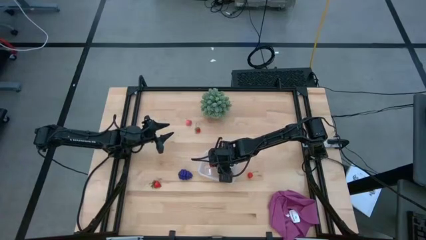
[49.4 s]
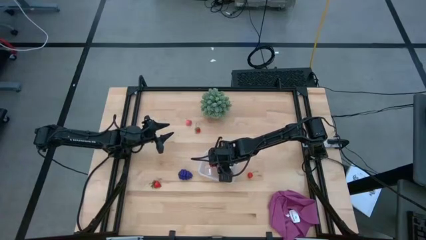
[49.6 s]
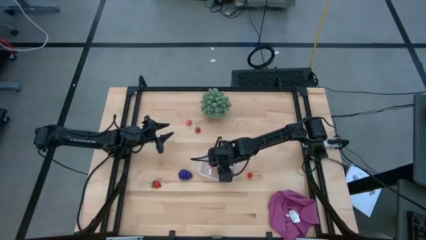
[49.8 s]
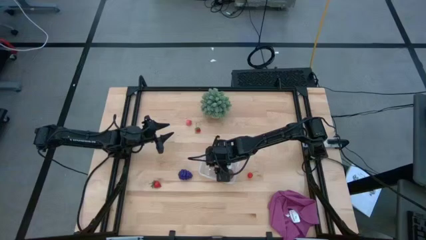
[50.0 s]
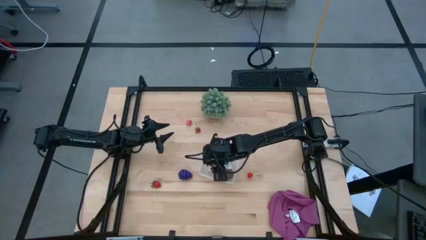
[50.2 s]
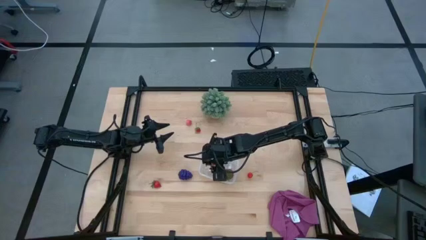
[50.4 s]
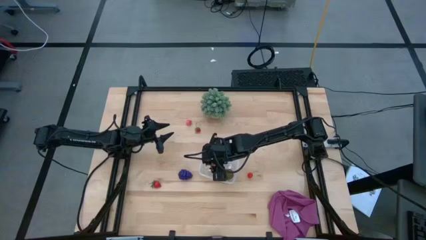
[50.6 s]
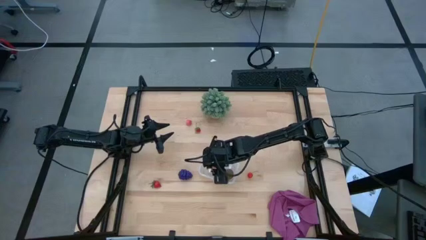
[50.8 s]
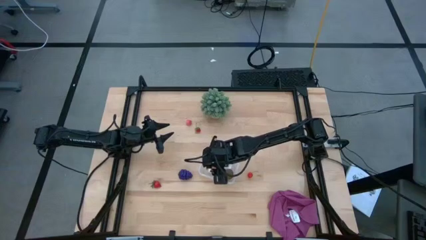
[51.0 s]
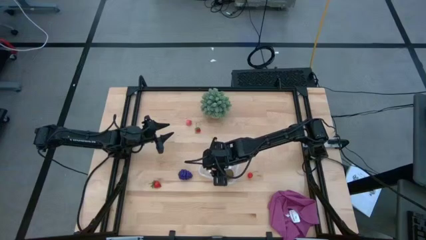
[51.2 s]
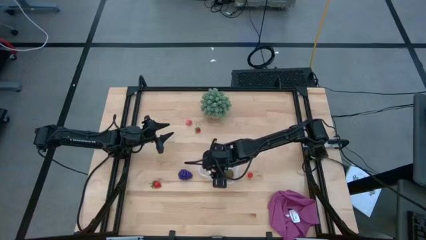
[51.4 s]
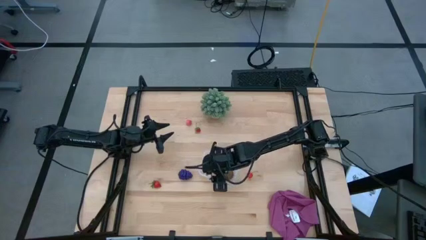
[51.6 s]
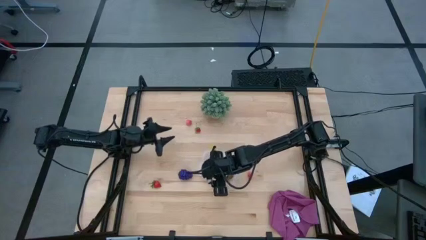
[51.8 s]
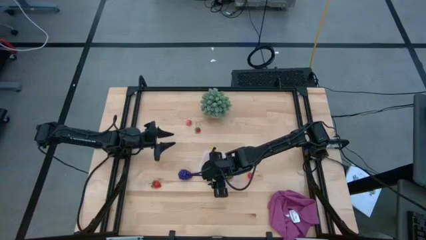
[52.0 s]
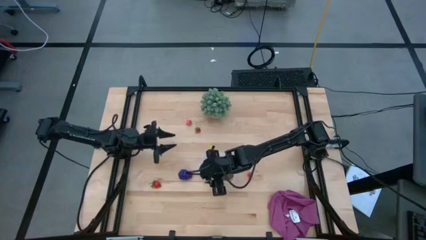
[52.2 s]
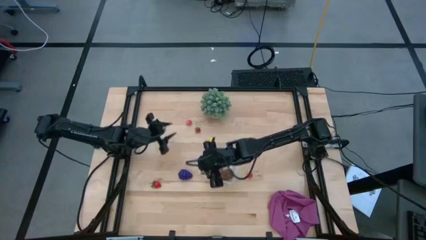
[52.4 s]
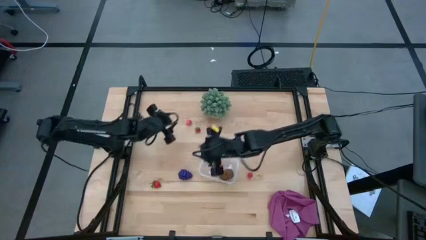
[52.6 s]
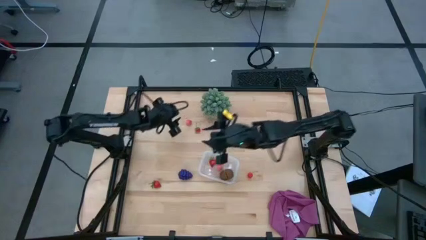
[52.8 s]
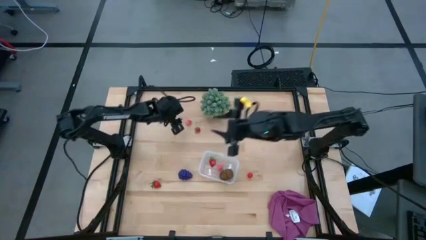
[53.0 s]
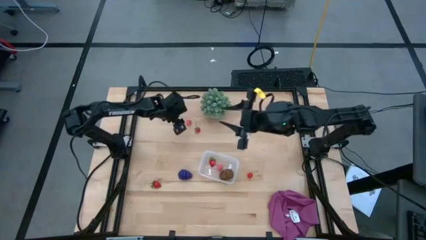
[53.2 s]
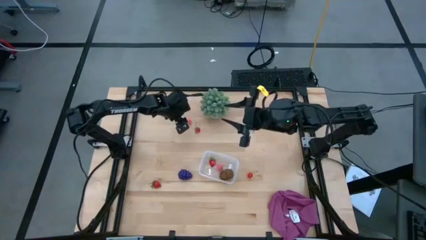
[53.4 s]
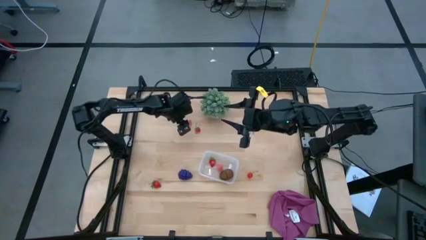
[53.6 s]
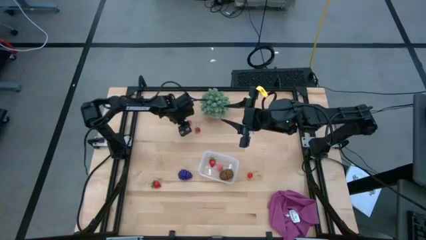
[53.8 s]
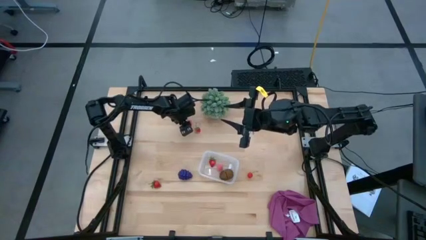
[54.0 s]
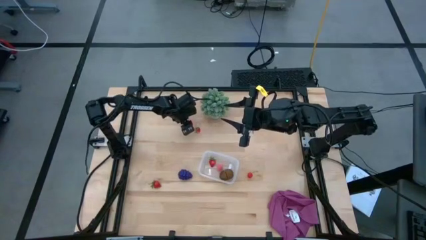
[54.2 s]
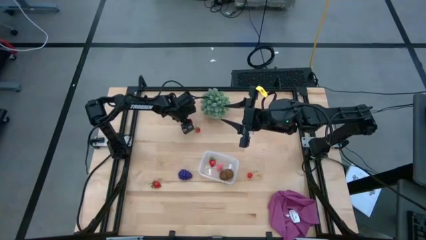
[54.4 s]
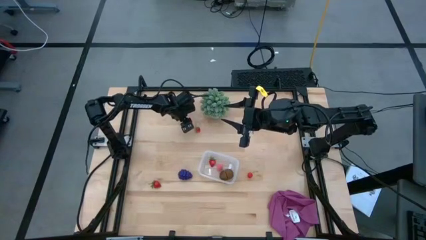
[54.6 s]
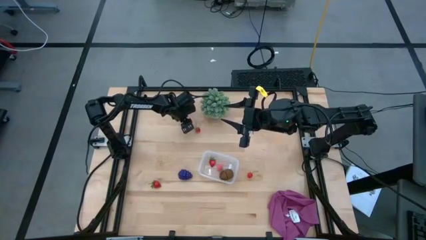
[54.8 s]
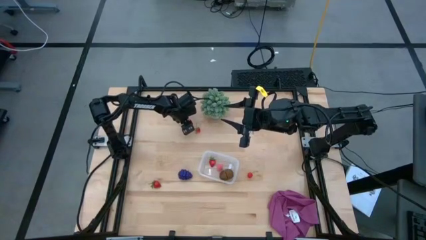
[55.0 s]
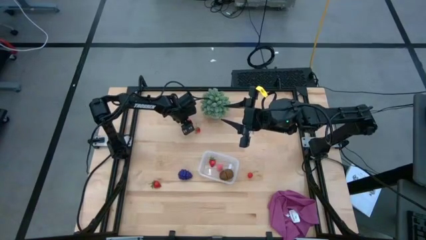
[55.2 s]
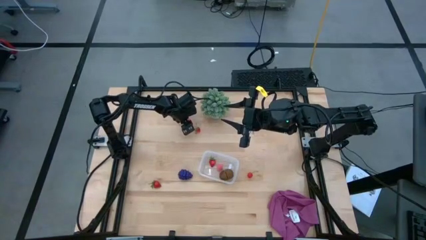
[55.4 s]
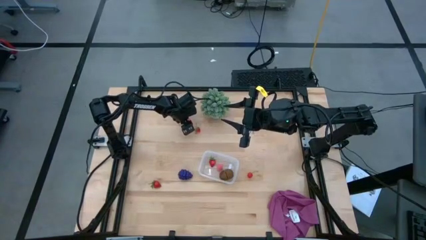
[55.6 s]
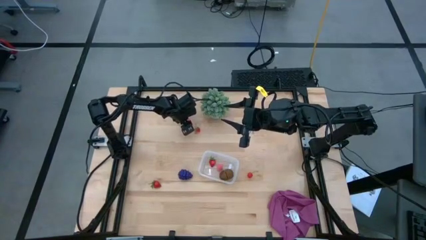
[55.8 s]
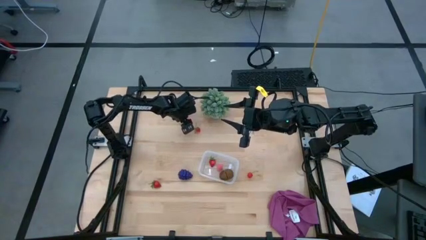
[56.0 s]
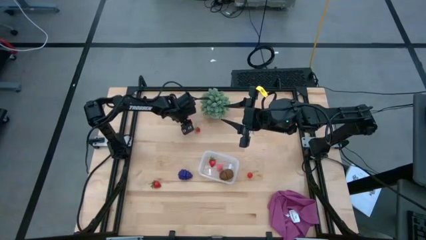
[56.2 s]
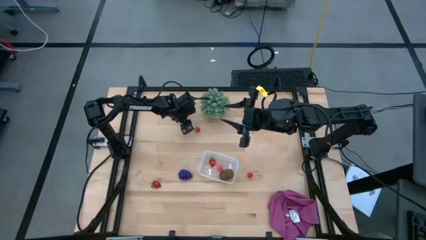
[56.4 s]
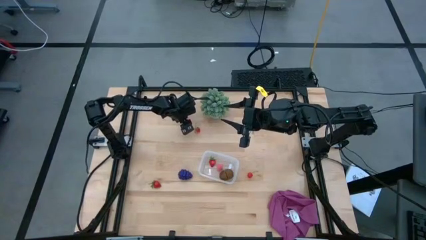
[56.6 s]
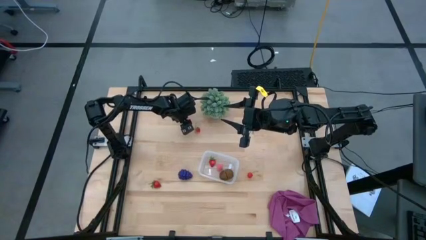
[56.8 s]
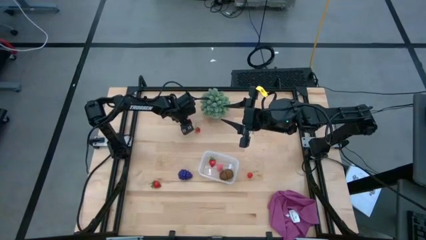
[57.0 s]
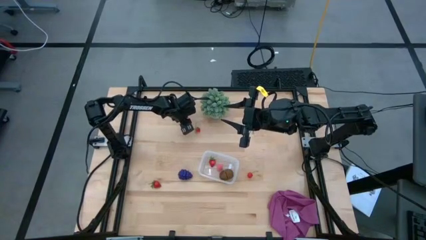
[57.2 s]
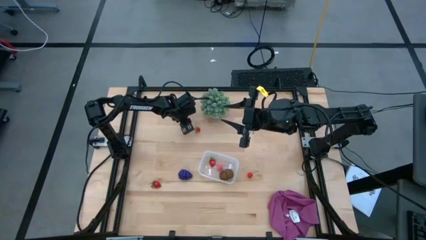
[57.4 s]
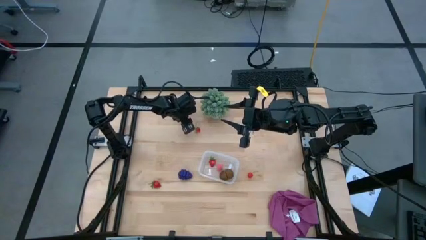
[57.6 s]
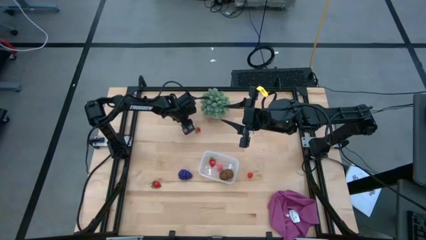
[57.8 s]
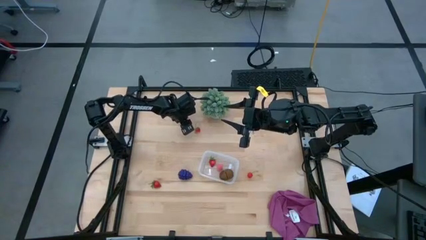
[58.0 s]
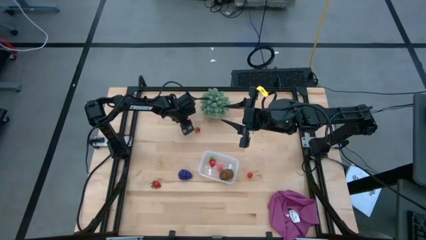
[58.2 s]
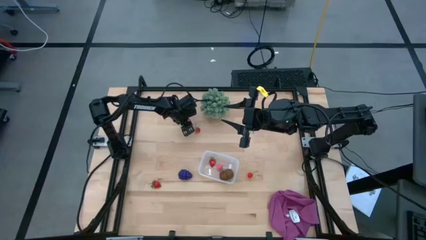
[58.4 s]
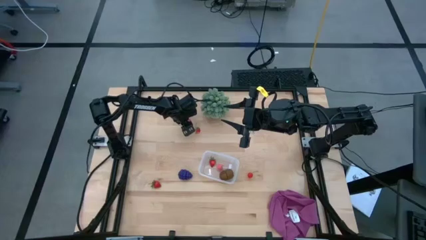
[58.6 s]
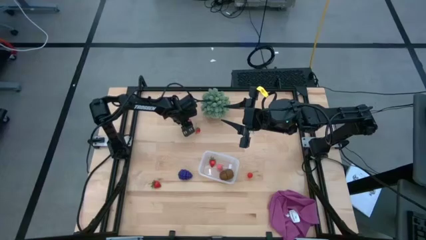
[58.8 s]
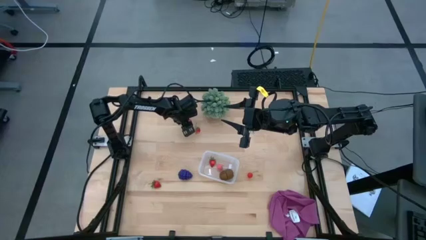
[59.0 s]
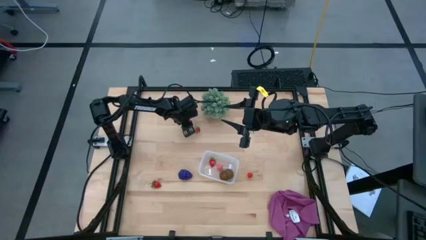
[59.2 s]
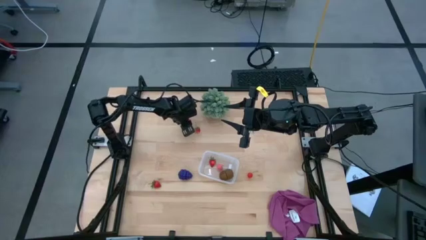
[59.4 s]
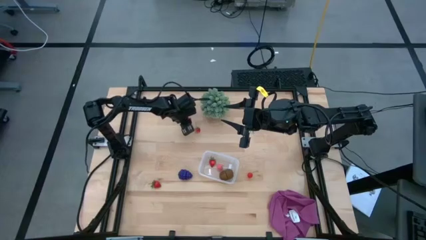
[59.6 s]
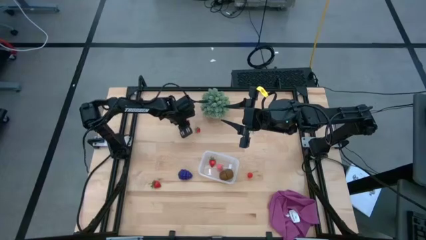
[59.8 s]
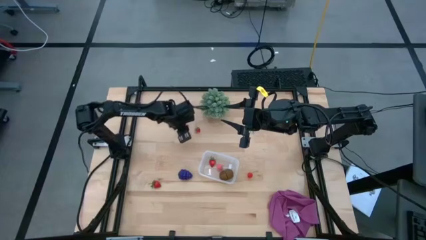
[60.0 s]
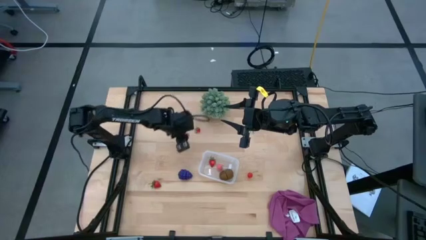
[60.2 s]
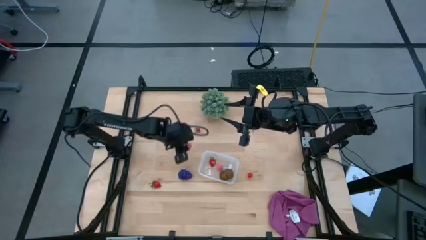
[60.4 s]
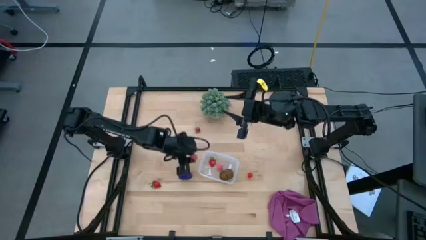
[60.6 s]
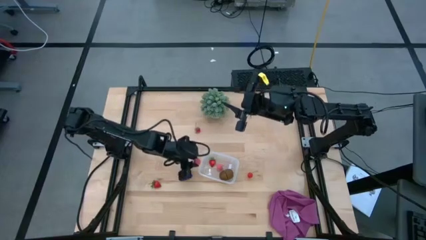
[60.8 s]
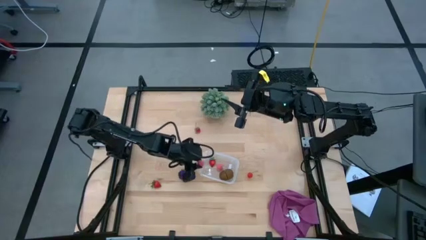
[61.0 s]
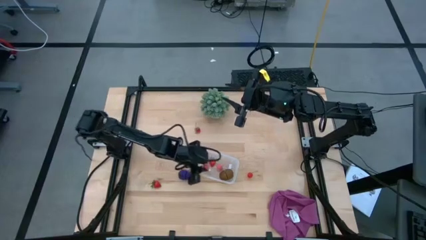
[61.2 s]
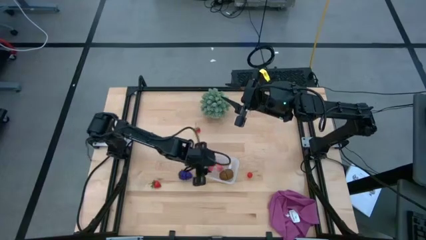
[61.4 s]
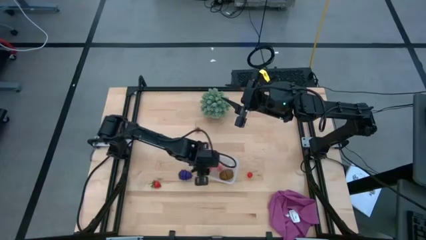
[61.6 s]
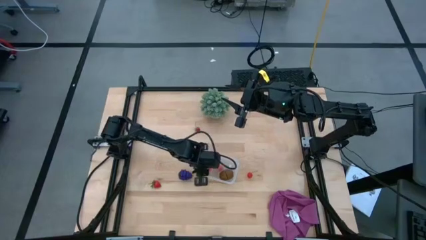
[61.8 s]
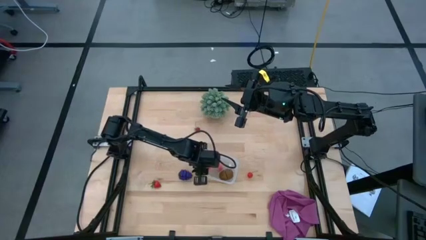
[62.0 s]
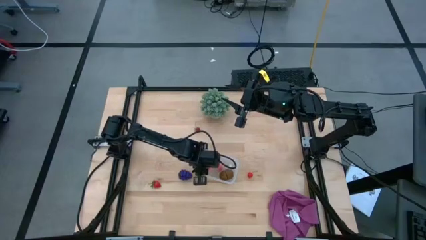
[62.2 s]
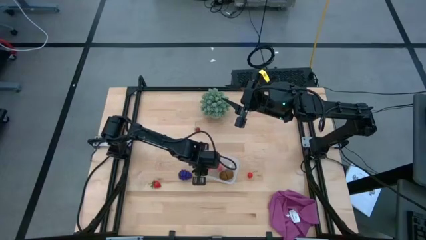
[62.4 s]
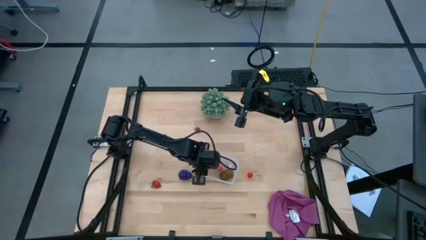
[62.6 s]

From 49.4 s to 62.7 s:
Task: Pick and placing Produce into tupperware
Put the pink peach into the bin

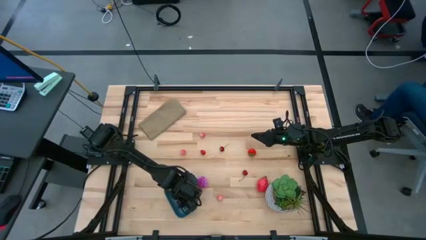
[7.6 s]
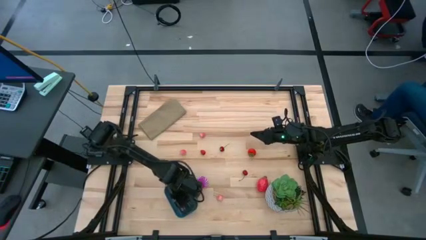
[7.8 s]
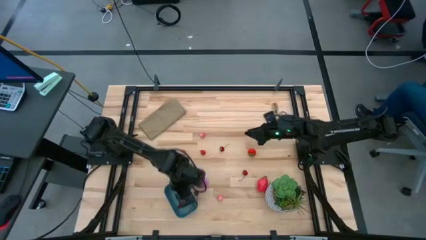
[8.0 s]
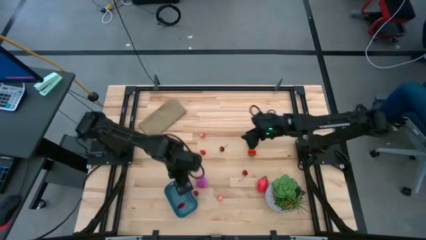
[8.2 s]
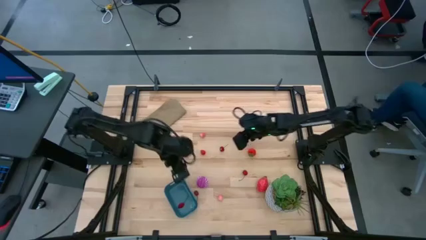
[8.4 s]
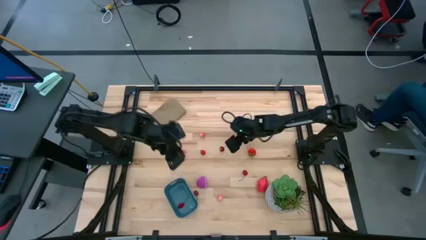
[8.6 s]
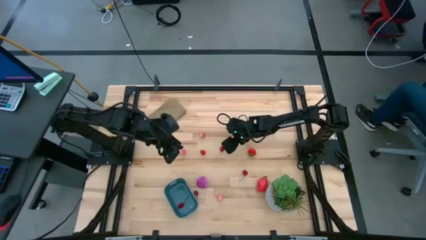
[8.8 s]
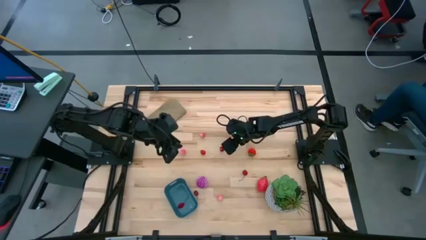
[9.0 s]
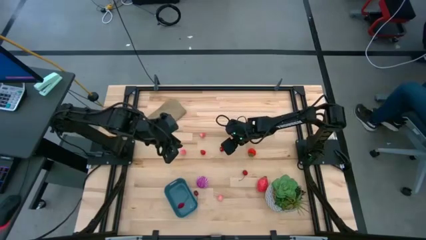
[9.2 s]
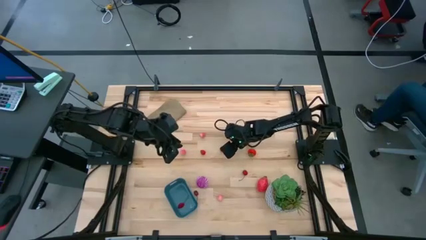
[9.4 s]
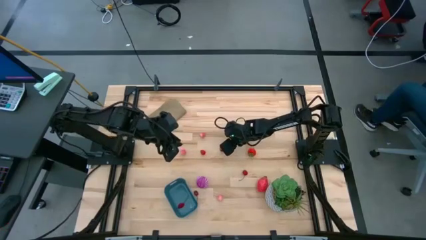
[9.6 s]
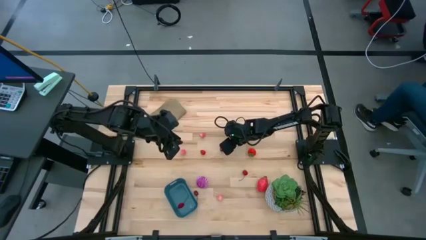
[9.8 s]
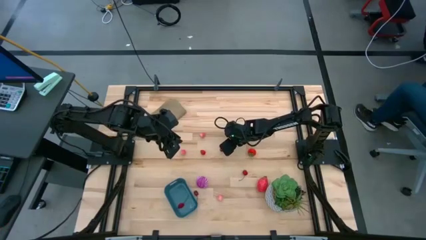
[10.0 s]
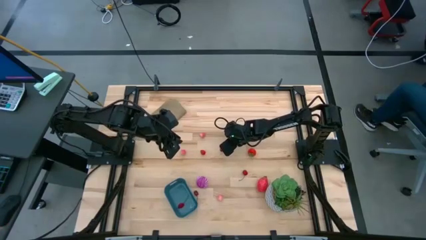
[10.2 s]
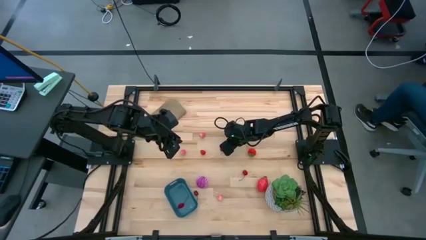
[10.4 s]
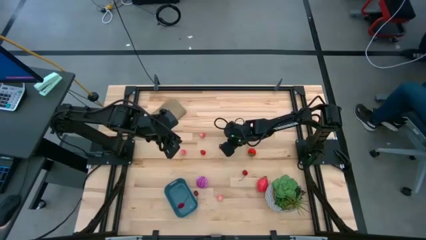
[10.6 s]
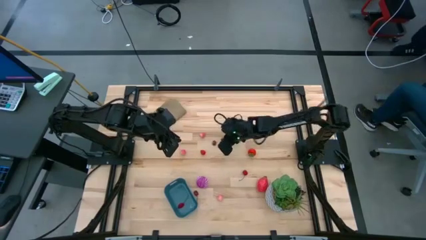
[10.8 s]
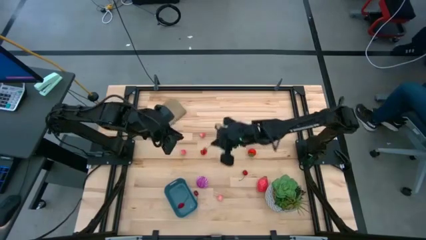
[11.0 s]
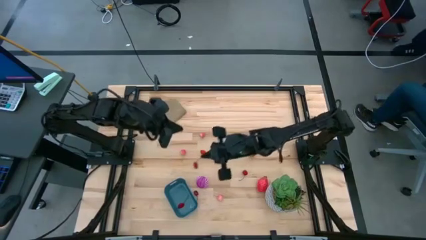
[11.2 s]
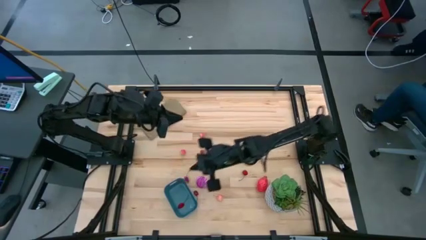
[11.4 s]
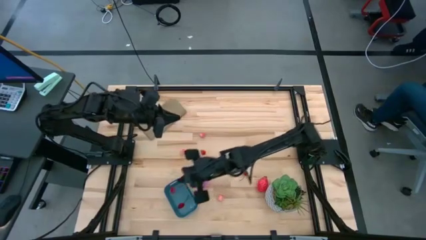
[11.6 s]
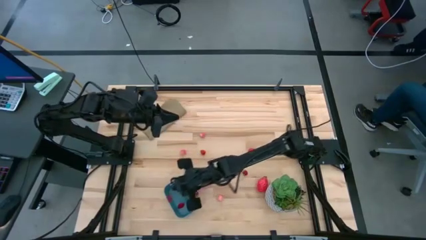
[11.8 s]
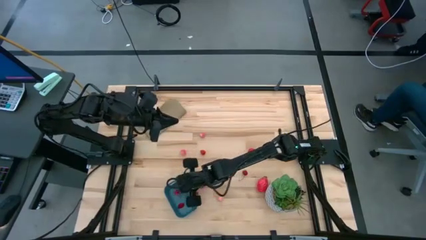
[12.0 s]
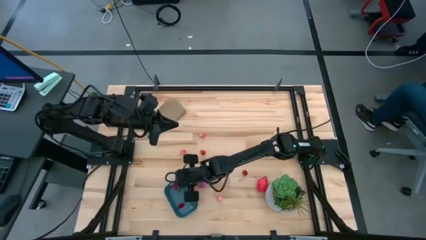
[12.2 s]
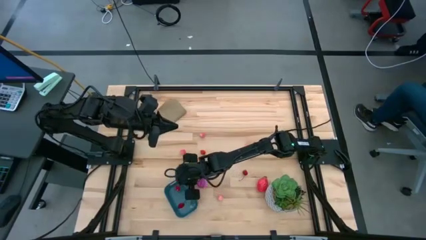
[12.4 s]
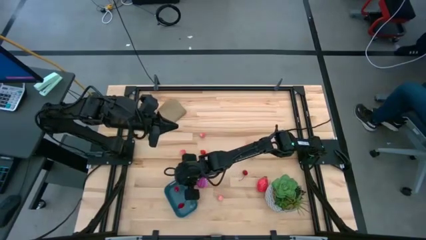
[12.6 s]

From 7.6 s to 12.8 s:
Task: Pick and placing Produce into tupperware
Put the red cherry into the blue bin
